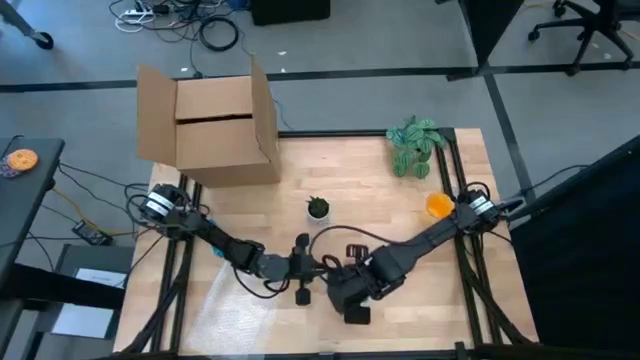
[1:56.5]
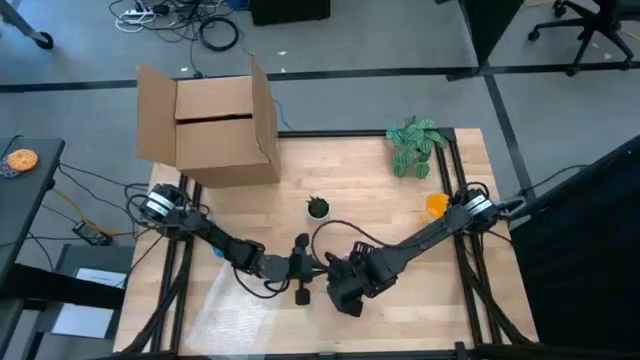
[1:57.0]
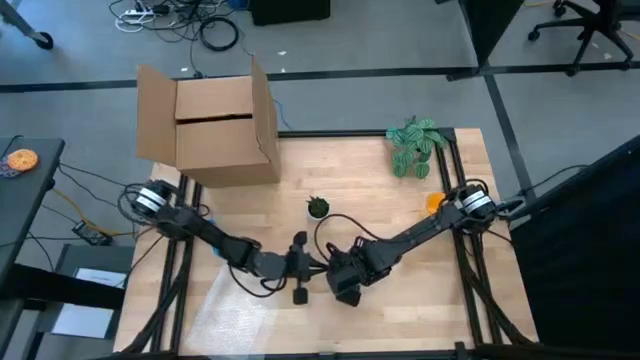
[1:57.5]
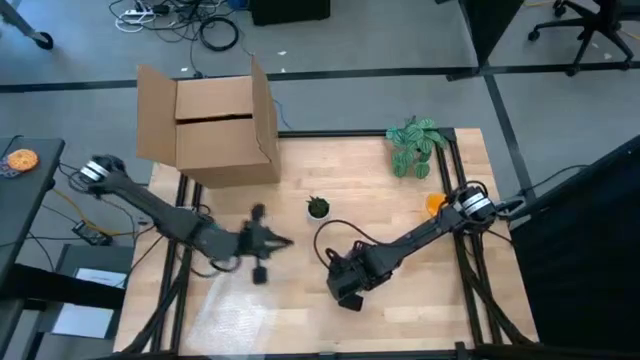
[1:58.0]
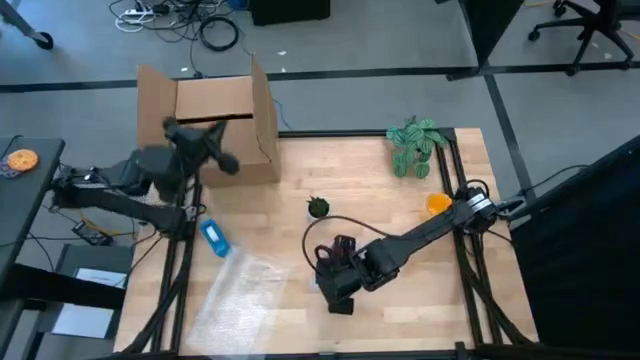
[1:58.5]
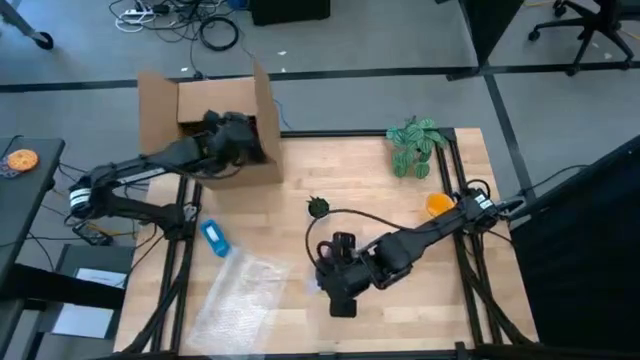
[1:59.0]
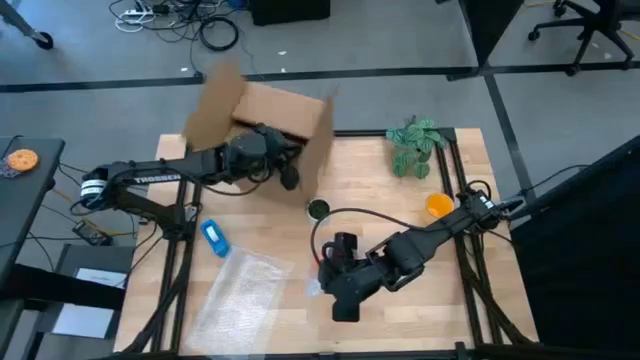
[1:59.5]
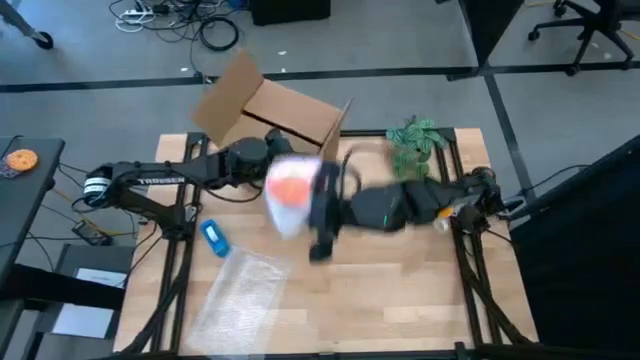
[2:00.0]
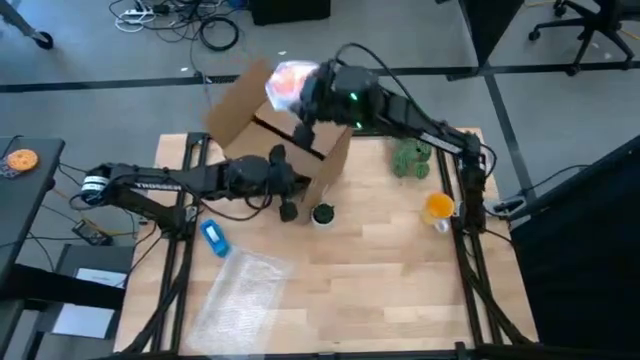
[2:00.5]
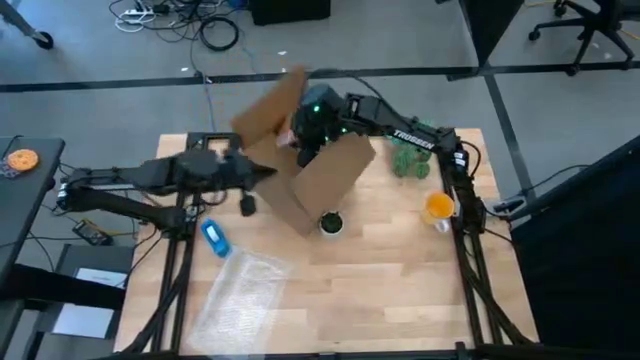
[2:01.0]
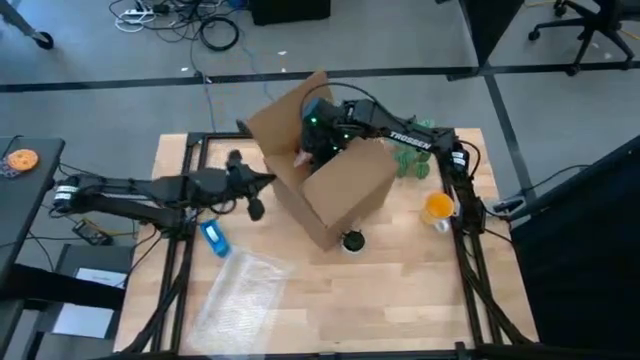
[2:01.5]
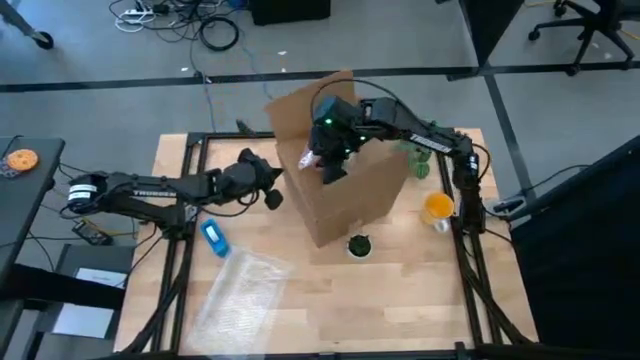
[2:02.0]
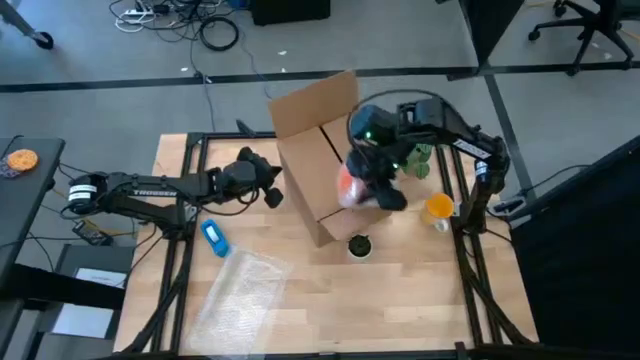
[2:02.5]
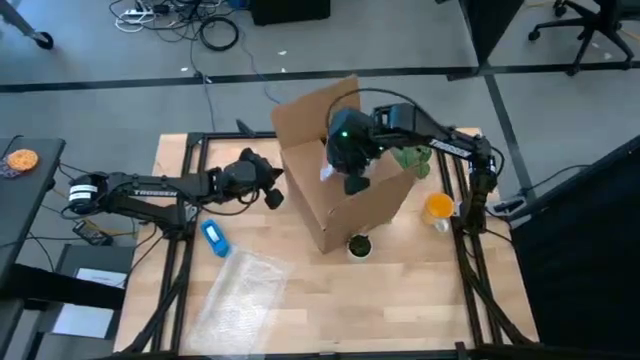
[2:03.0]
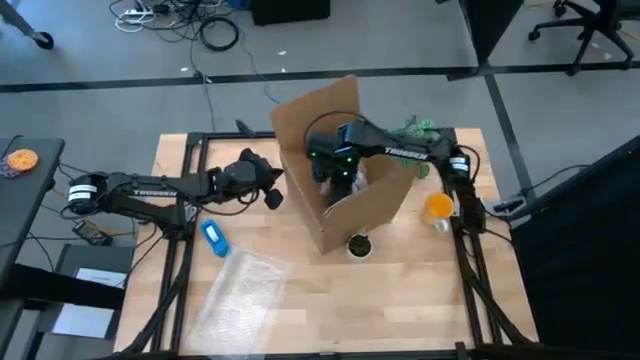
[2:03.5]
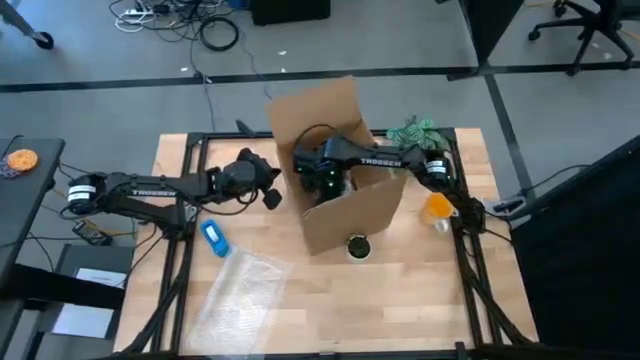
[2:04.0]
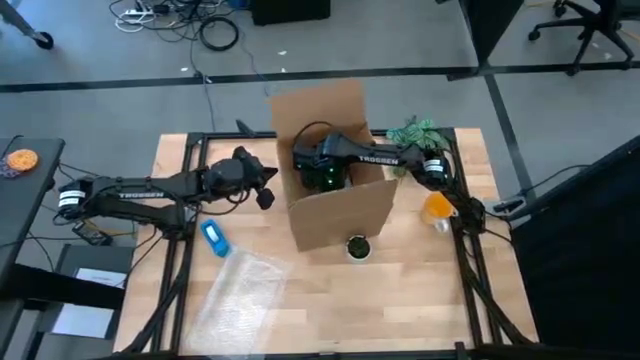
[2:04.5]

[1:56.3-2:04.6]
Task: wrap mug
Put the wrapped orange mug into the brown box

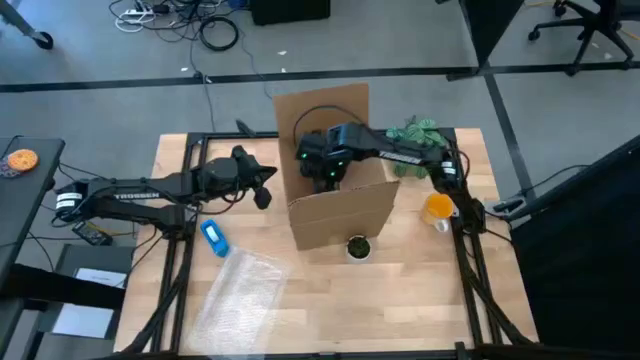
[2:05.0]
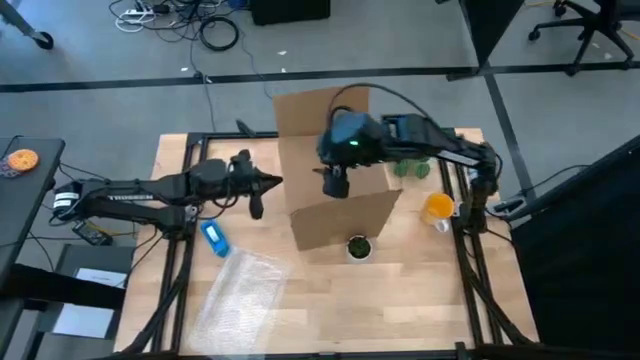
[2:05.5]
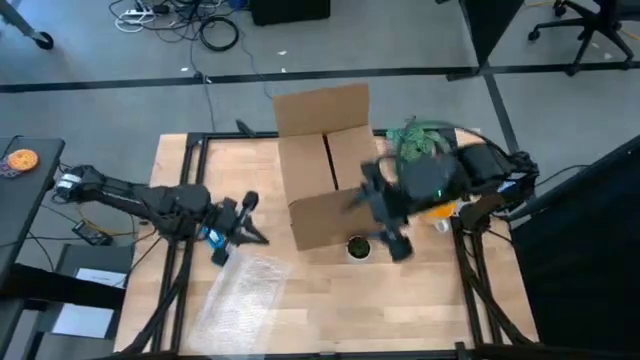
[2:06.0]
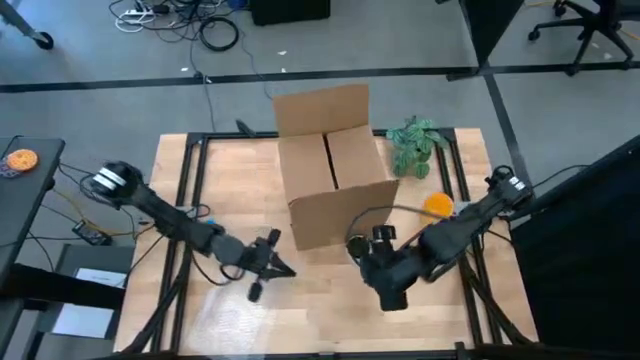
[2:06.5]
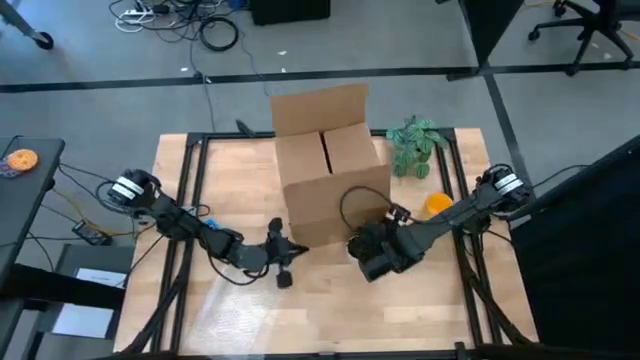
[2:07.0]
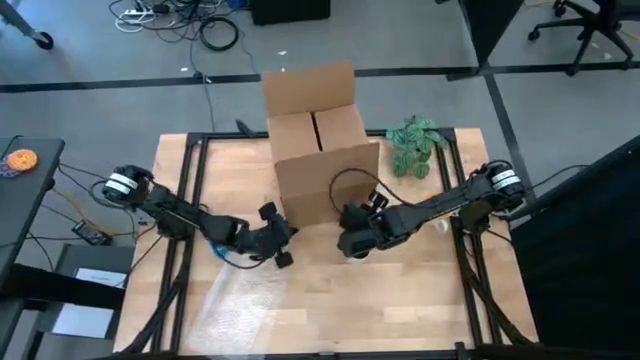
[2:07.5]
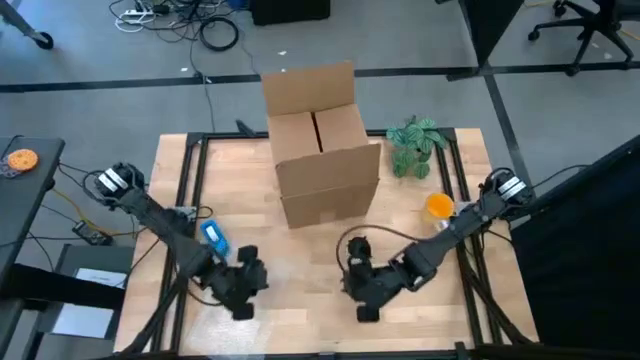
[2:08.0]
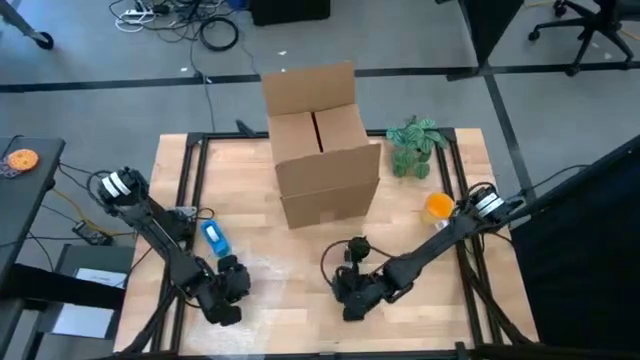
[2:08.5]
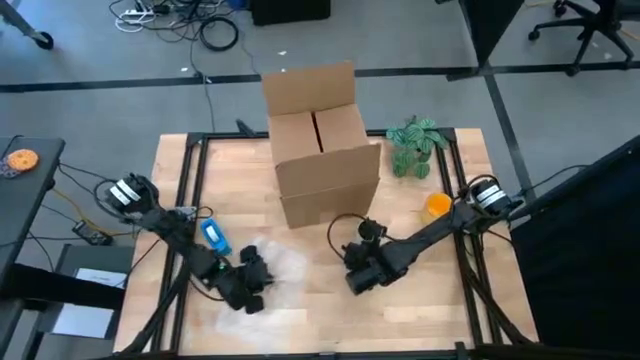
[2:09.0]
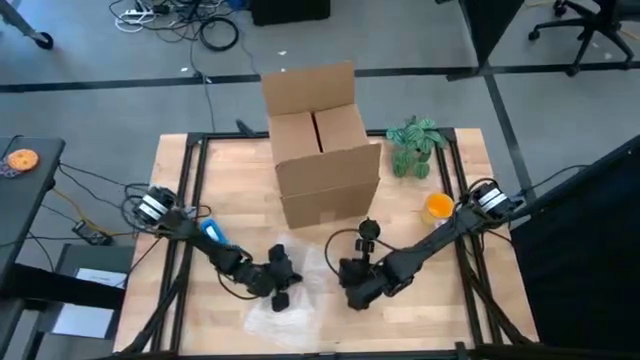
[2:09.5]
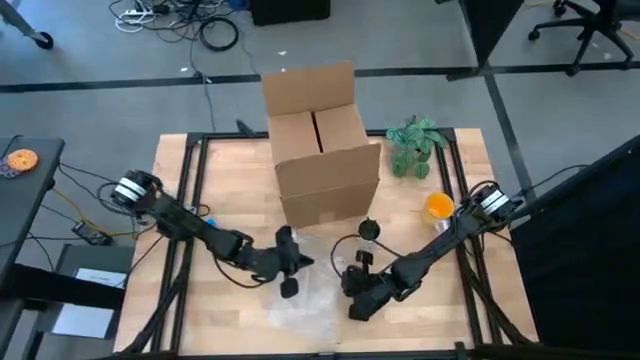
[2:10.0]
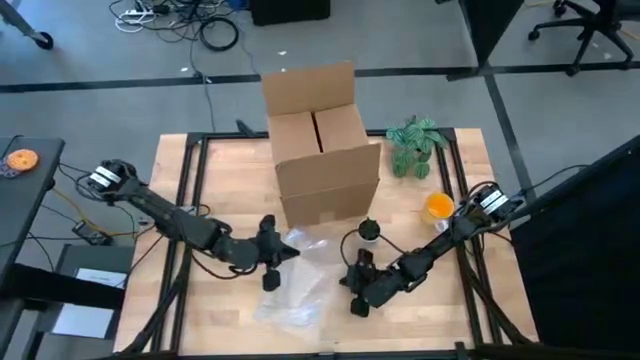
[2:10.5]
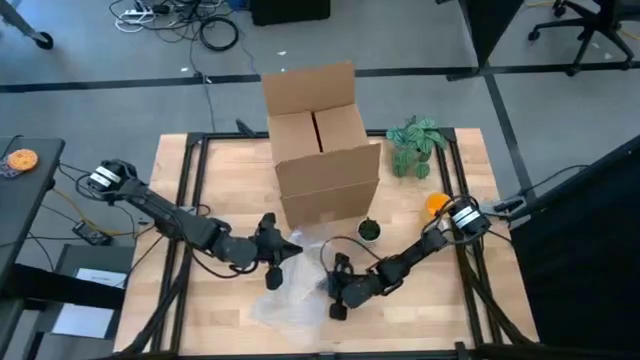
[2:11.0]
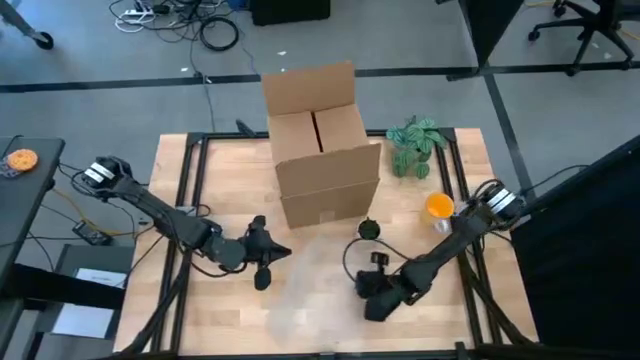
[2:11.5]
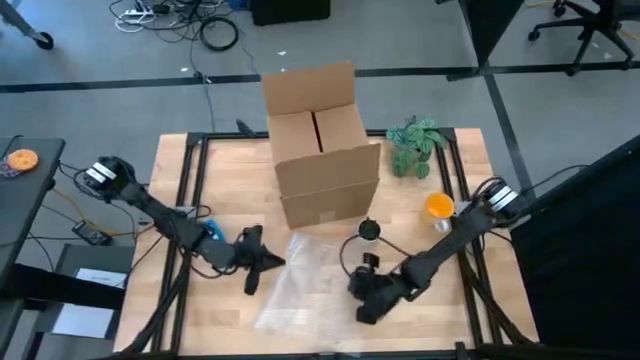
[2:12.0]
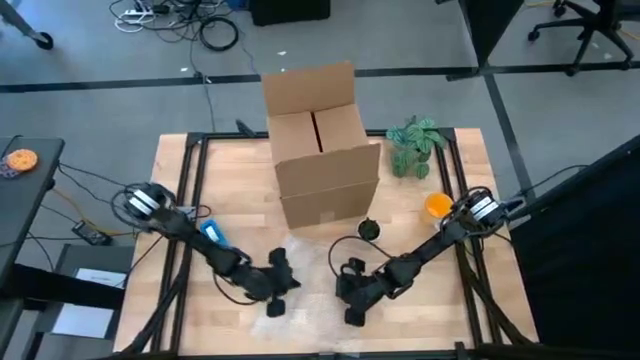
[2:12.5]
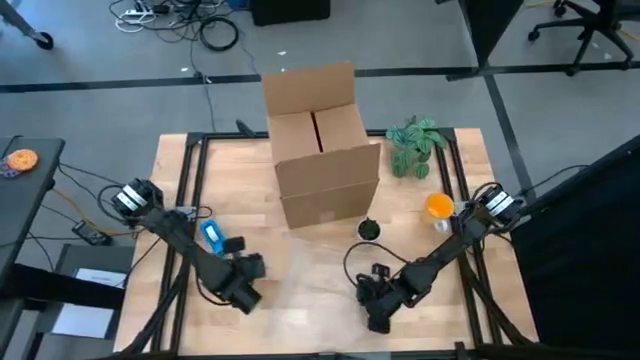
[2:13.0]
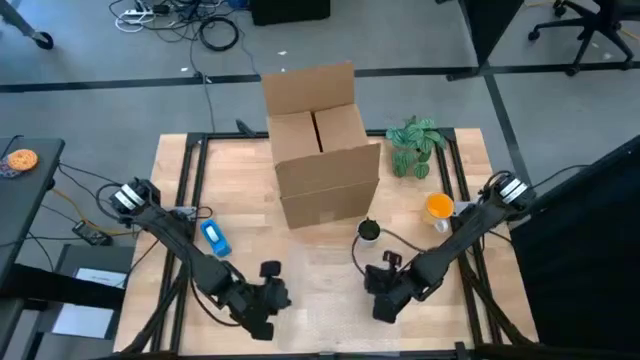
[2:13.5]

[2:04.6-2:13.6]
Prepare the bubble wrap
